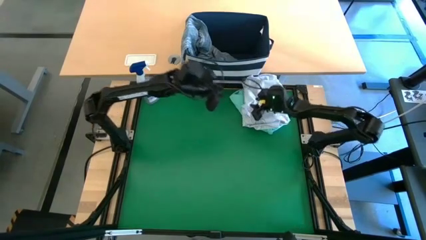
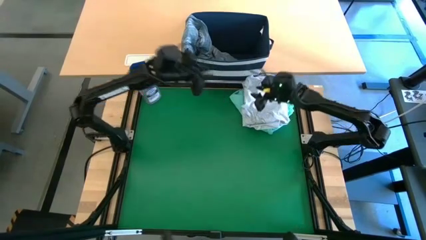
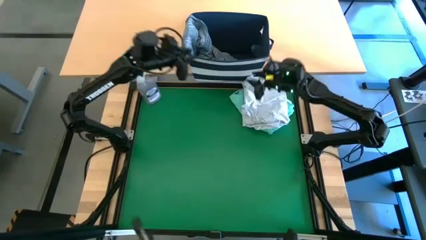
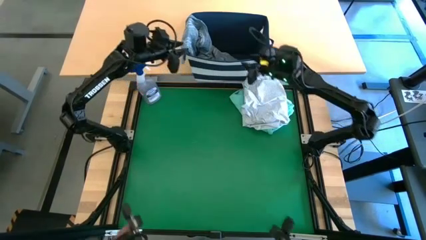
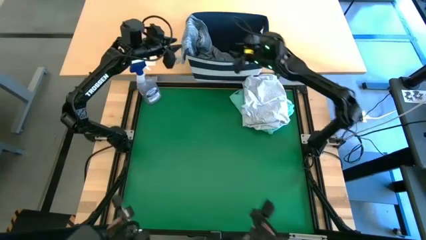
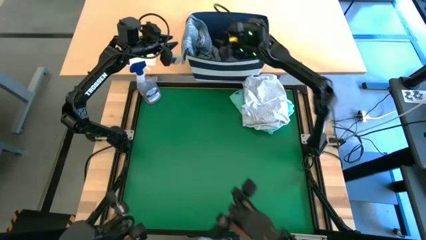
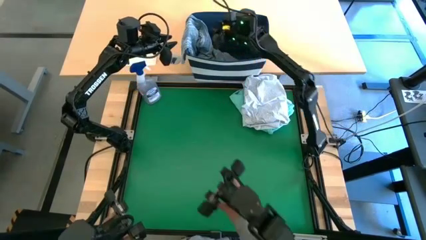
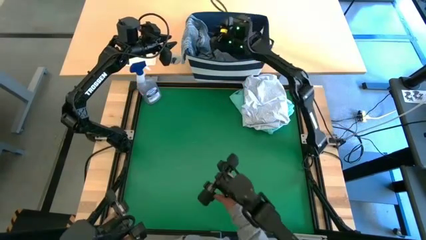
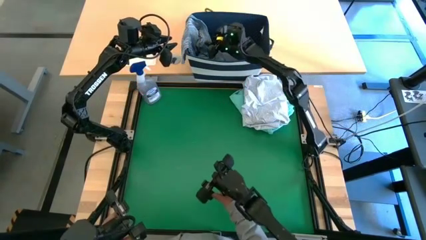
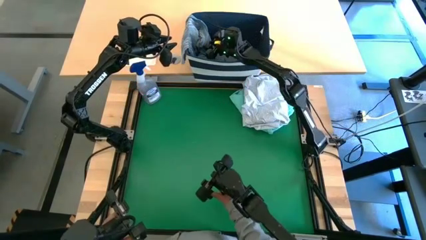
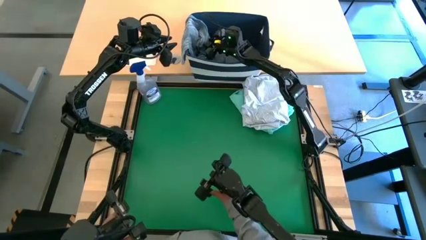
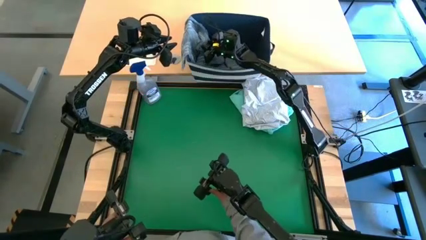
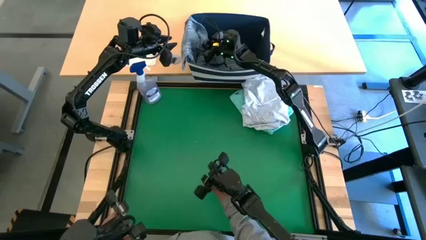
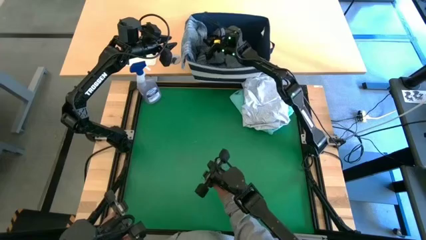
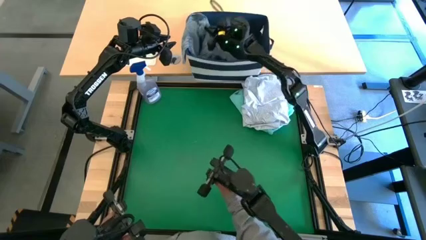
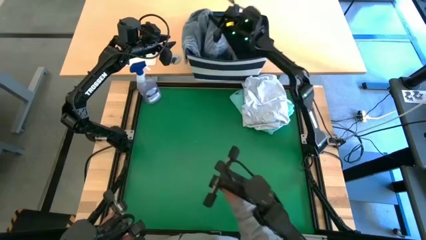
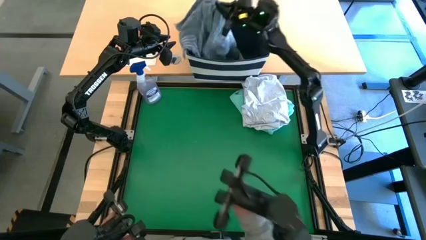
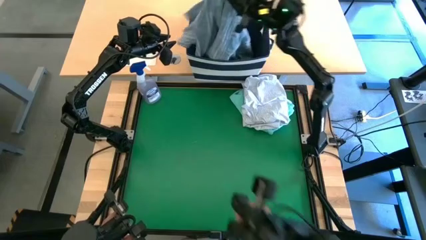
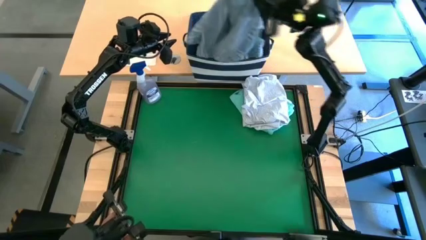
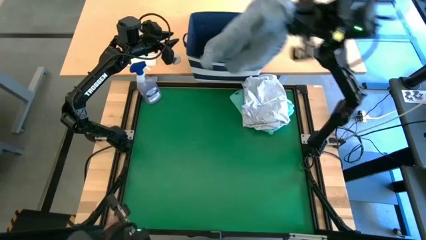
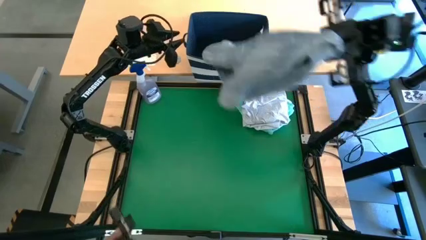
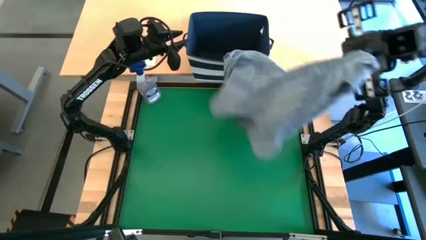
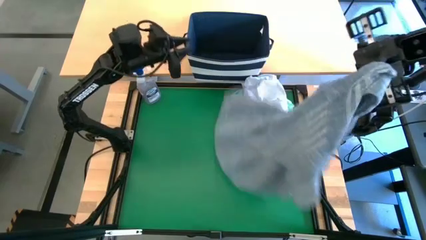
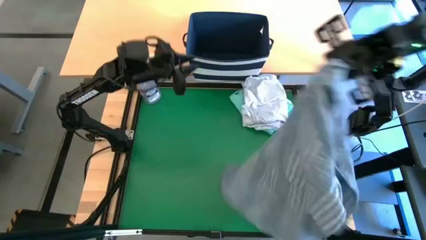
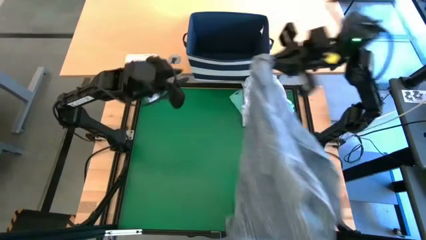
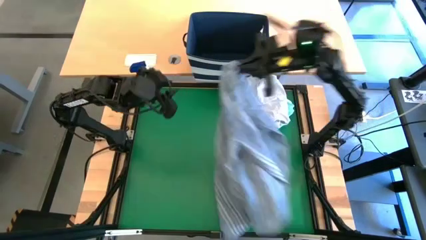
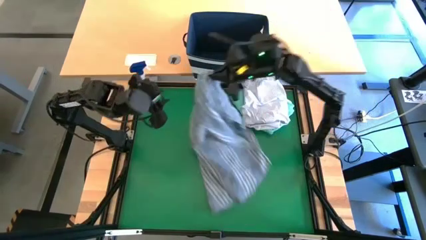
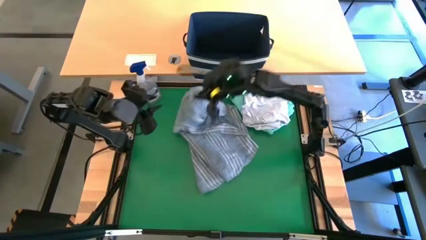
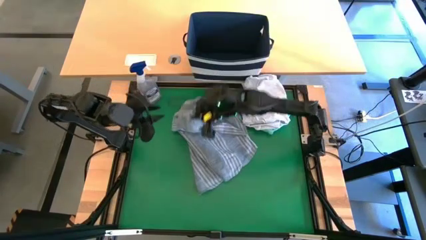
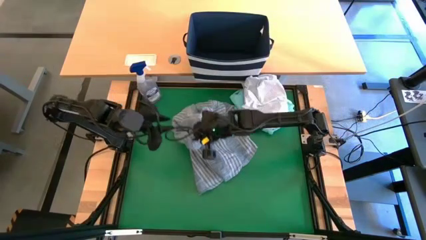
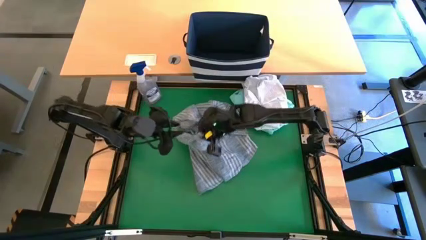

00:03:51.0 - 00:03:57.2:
Task: Fold laundry
Remove the blue polo shirt from the blue laundry bin

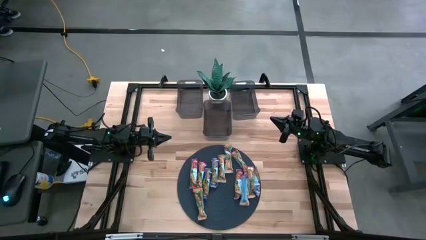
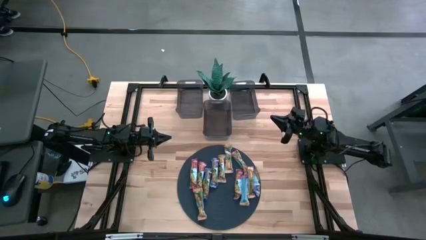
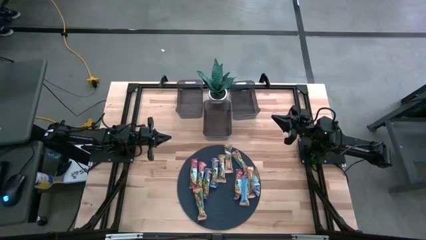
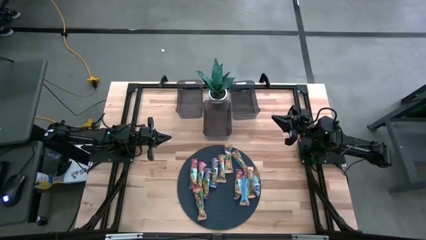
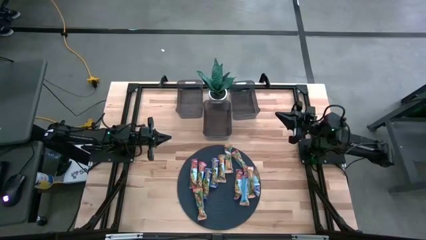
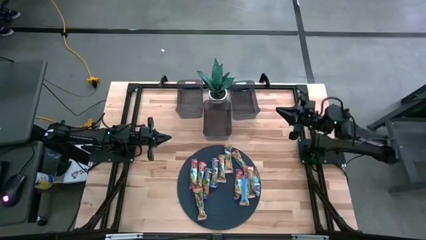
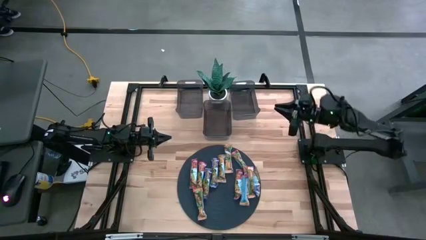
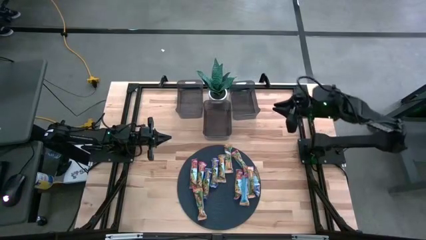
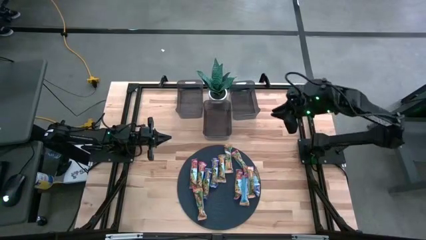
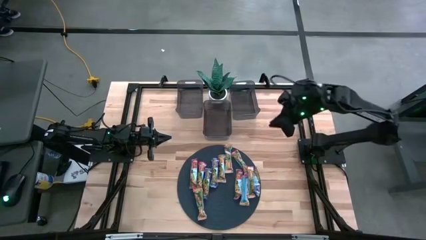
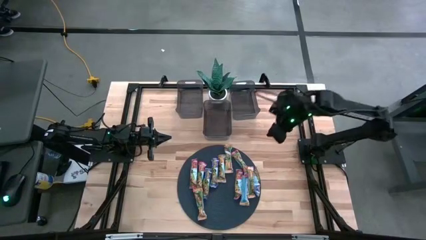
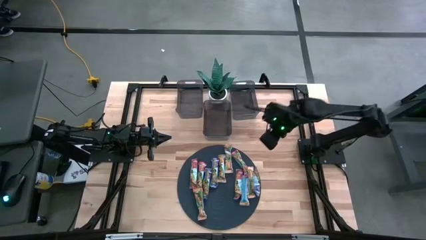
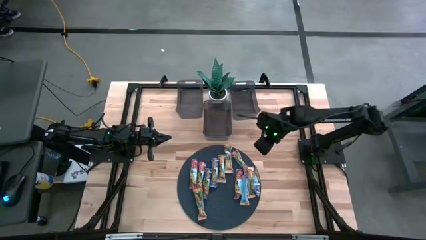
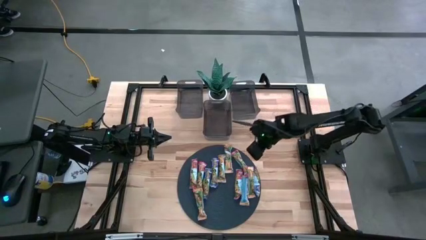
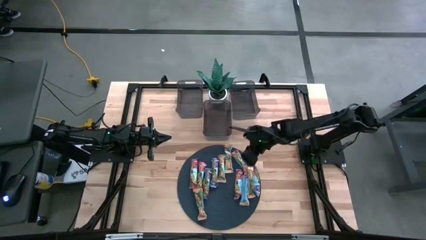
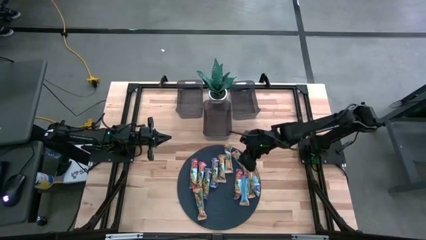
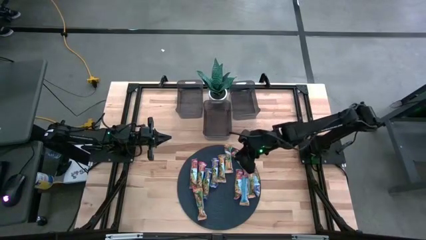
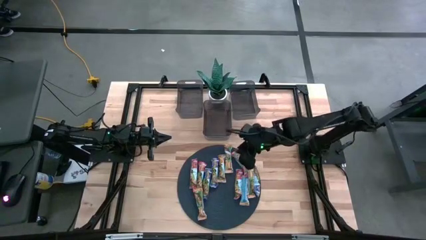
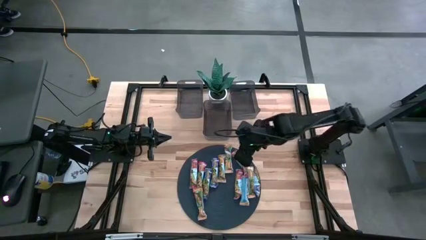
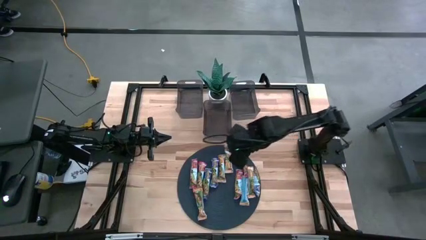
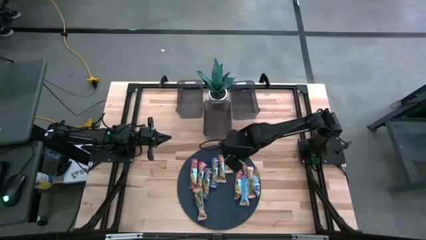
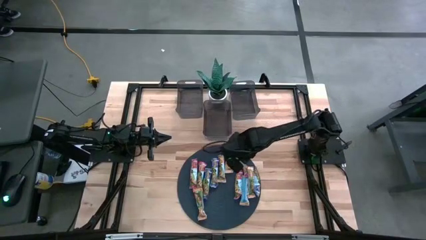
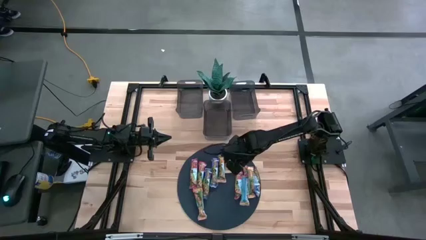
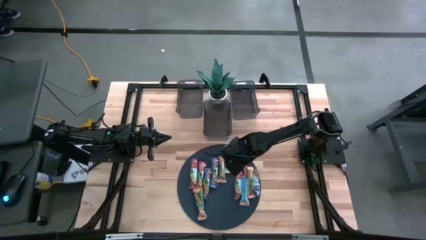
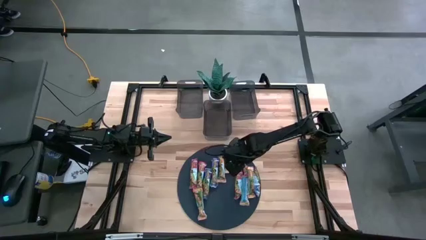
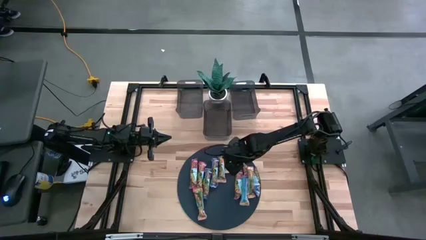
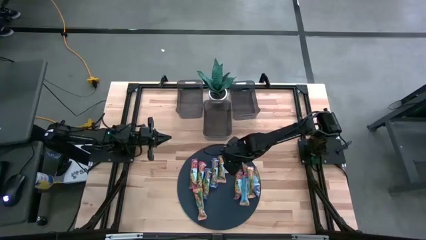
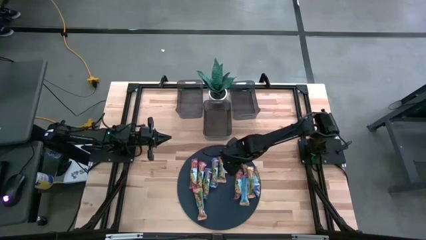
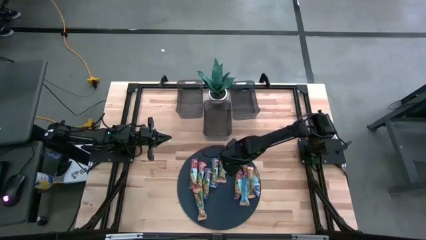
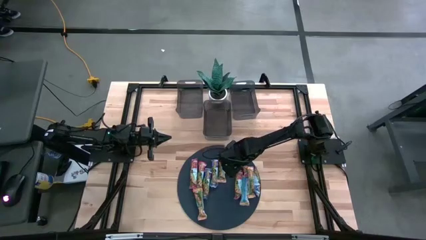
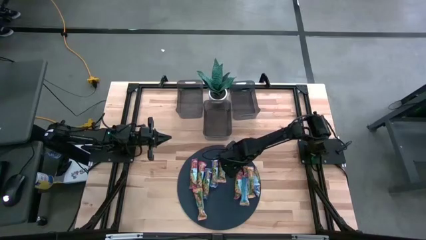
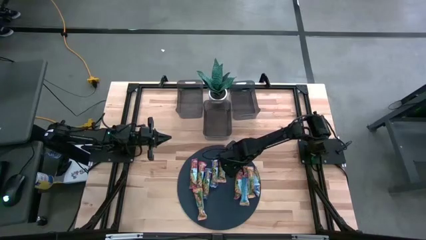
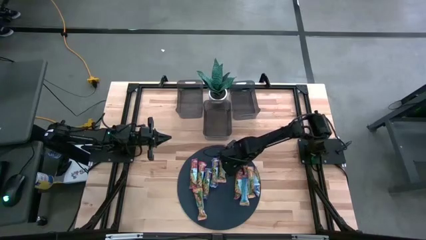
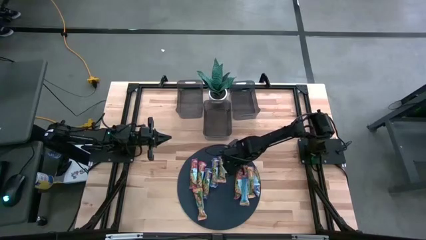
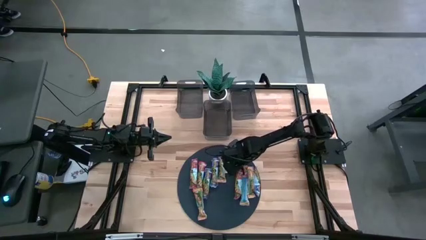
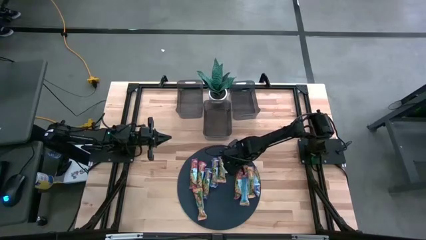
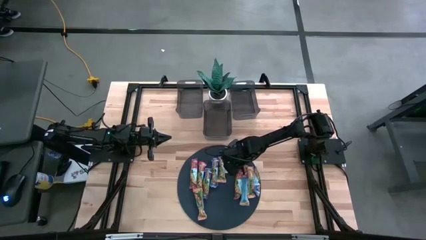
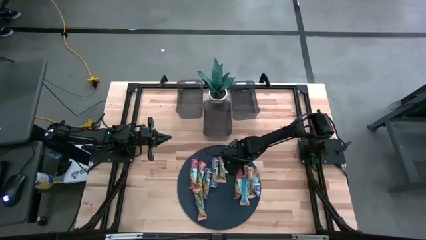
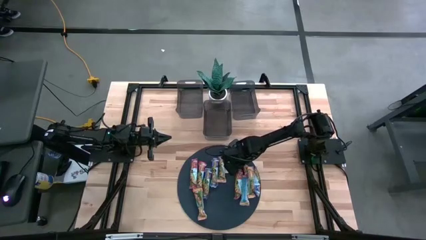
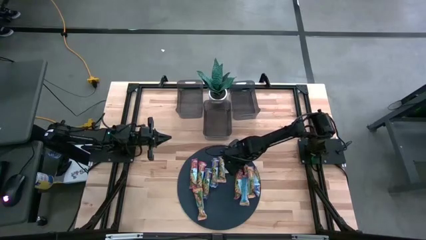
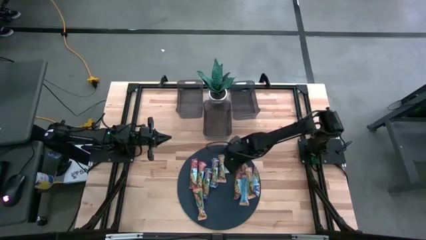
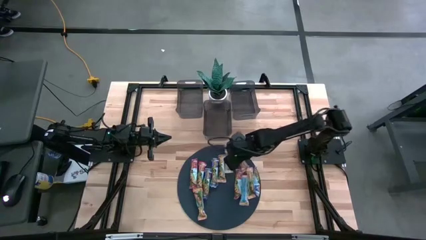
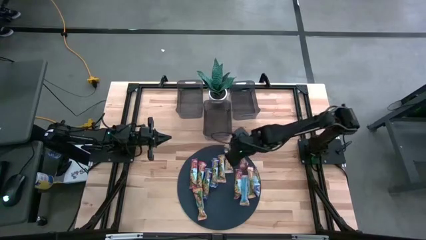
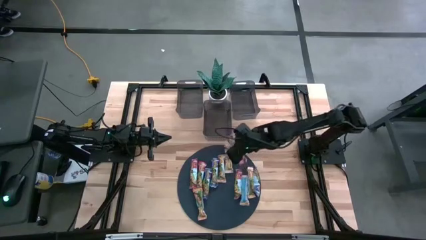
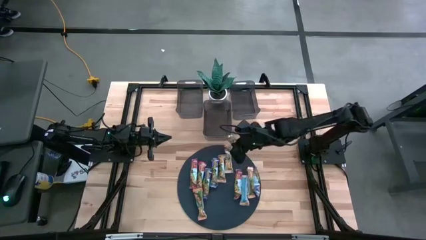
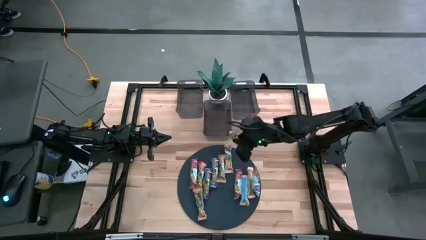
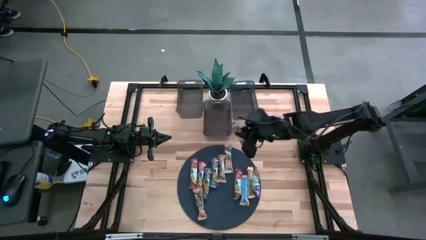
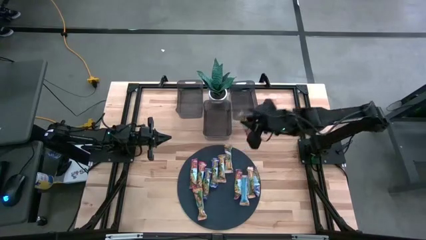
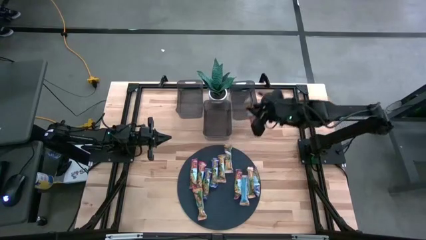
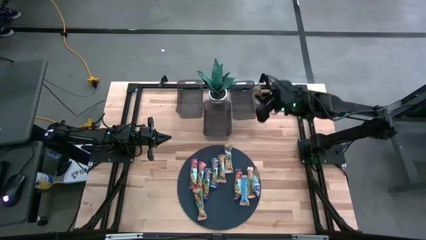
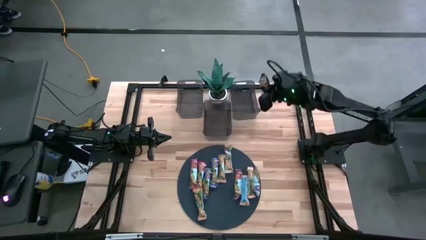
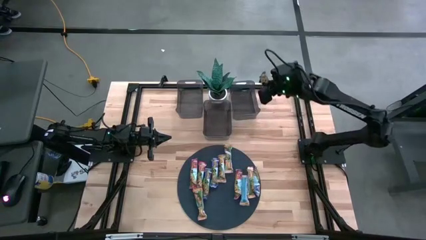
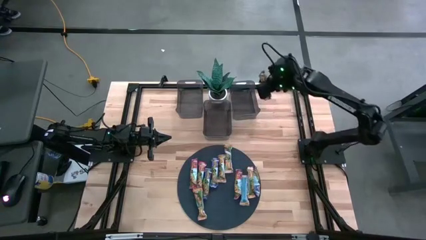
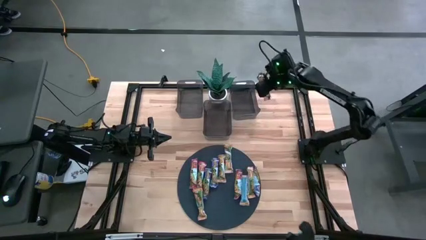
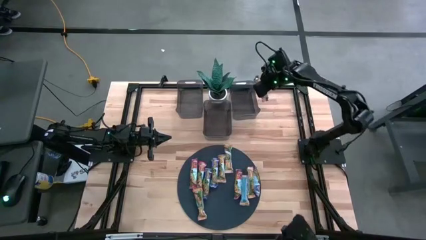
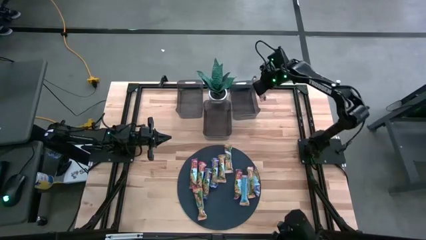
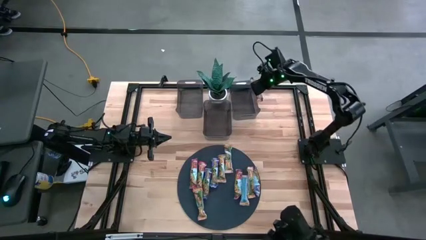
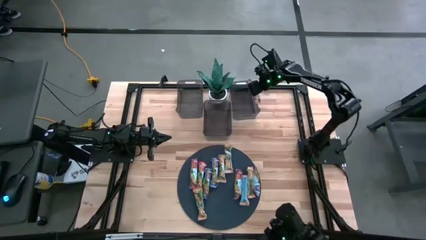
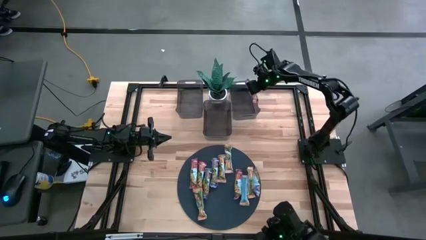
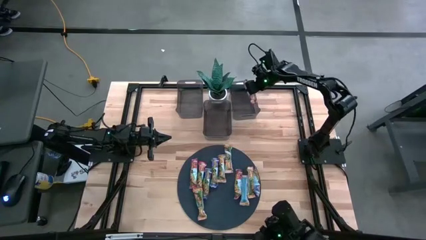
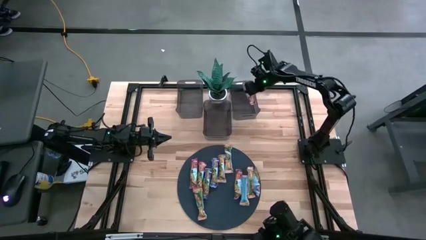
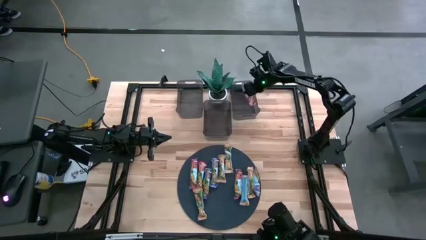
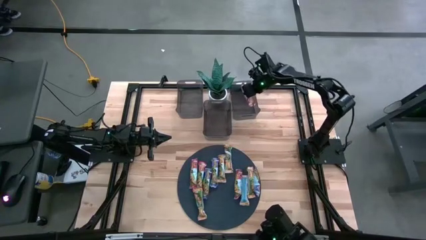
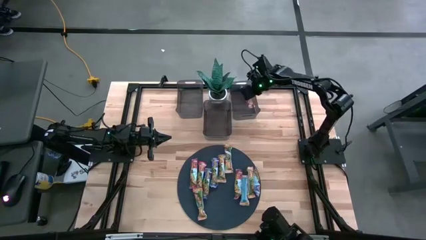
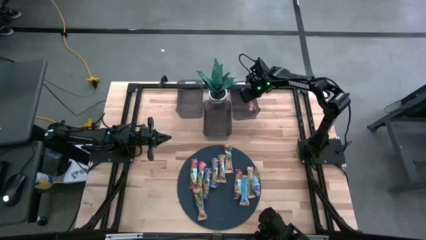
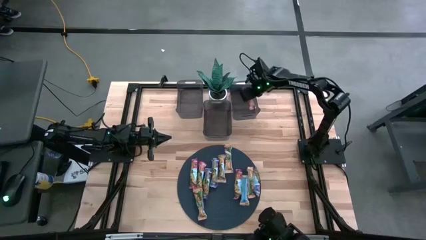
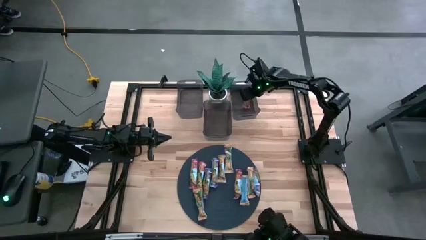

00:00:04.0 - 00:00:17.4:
Task: Pick and place Granola Bars by type
Put the red granola bar into the right black bin
